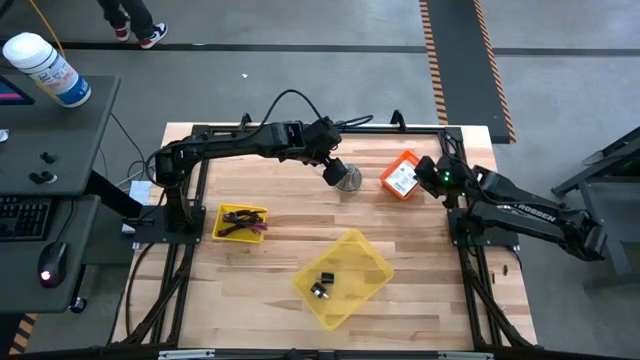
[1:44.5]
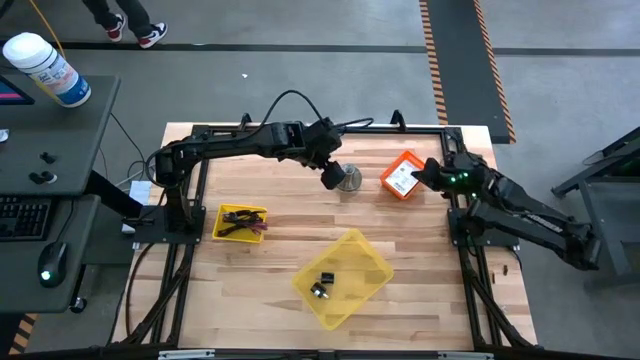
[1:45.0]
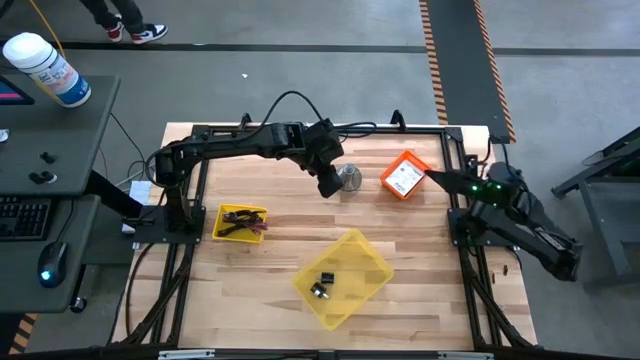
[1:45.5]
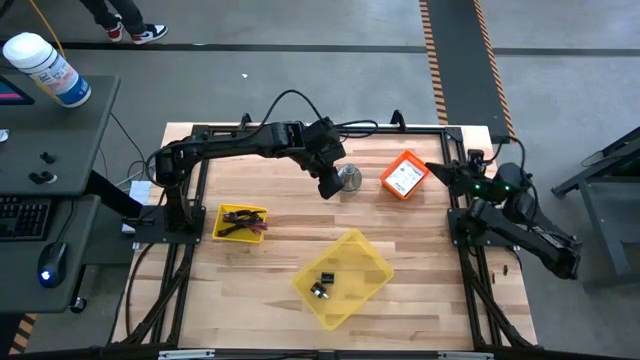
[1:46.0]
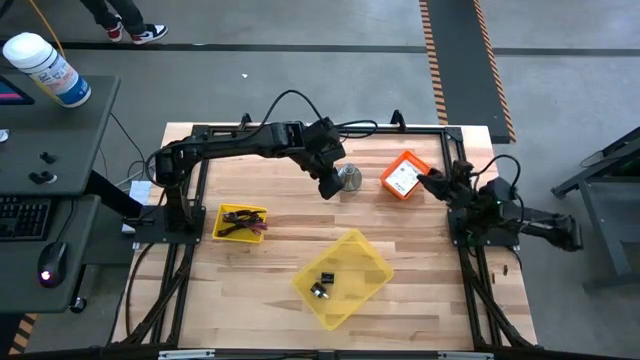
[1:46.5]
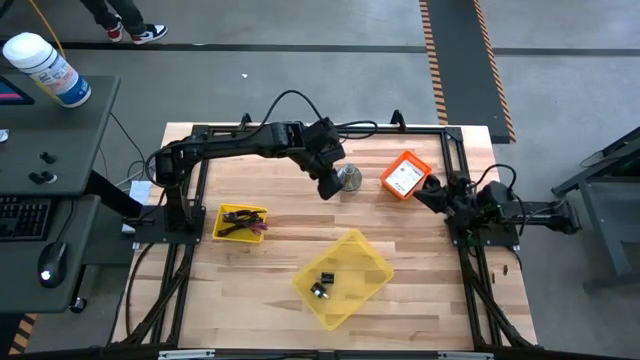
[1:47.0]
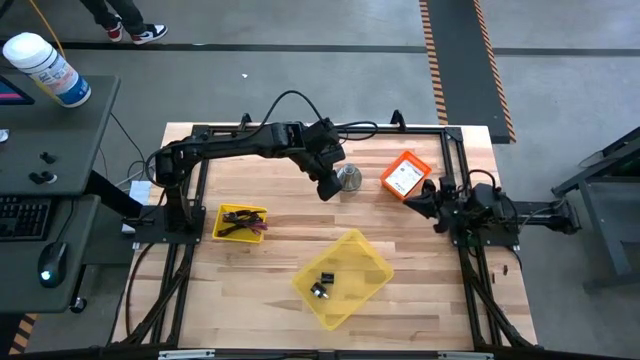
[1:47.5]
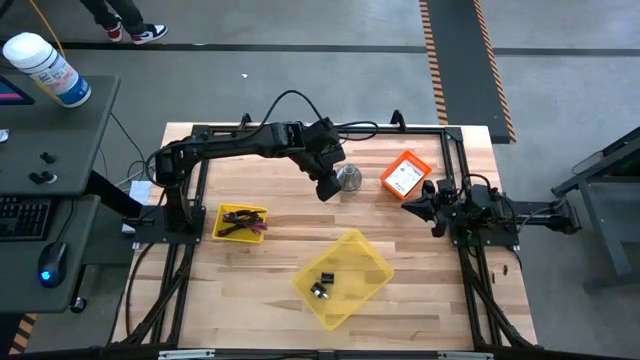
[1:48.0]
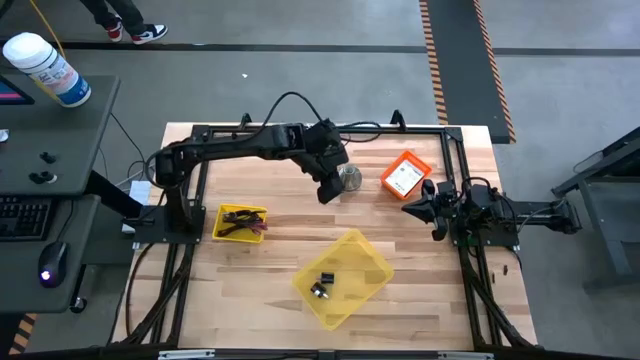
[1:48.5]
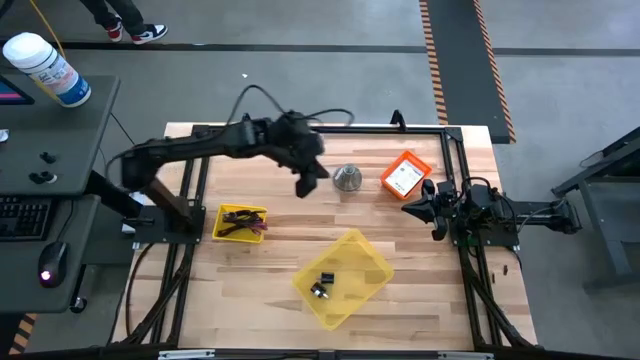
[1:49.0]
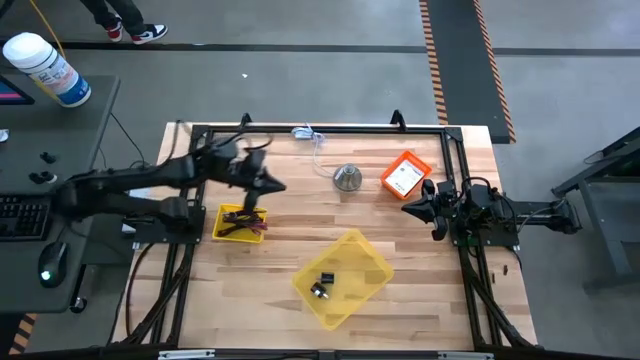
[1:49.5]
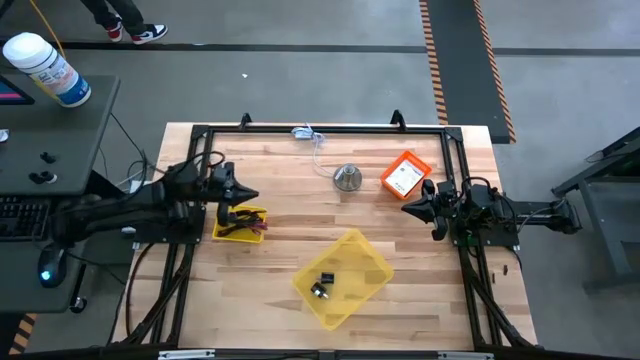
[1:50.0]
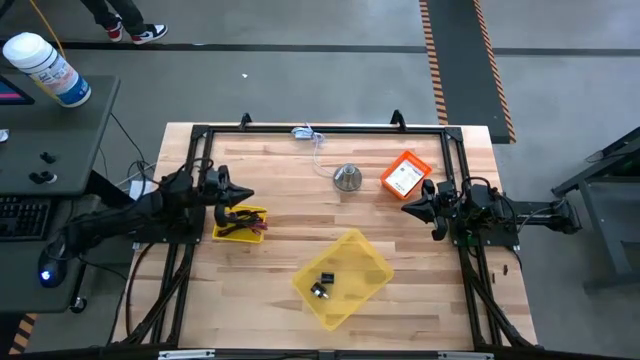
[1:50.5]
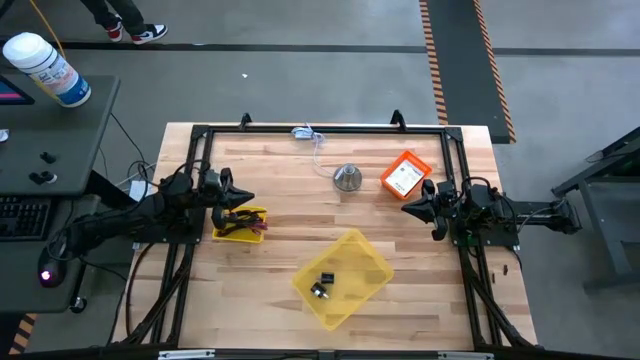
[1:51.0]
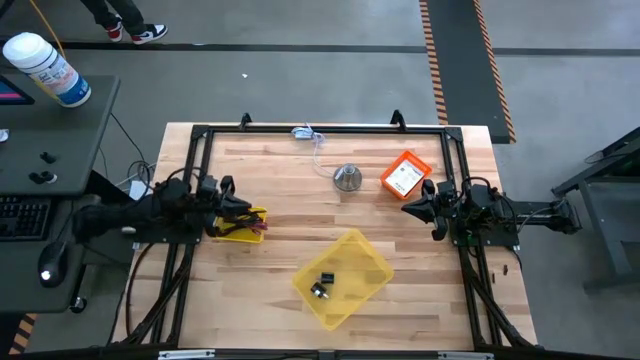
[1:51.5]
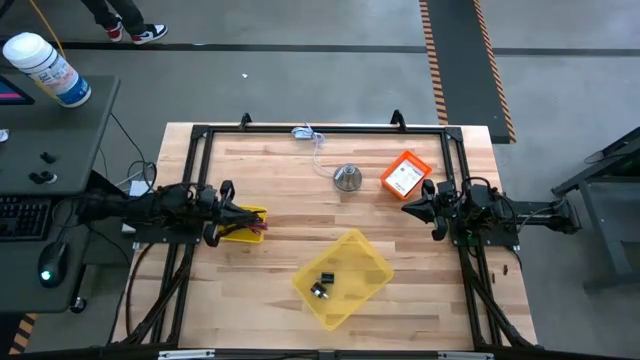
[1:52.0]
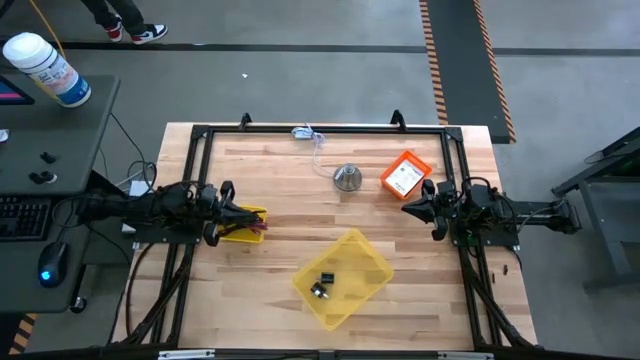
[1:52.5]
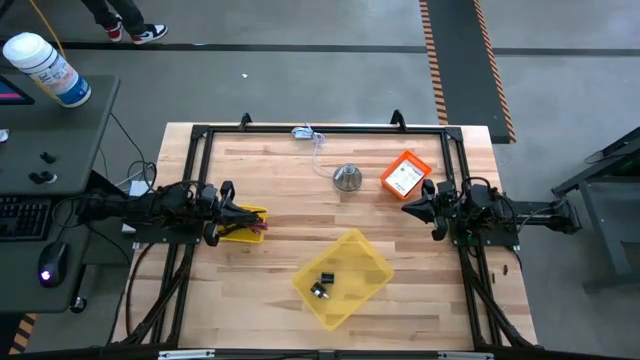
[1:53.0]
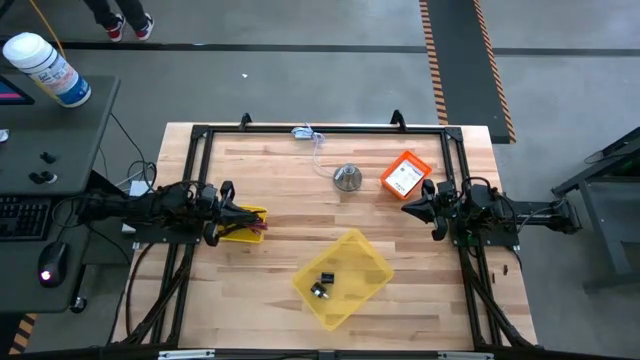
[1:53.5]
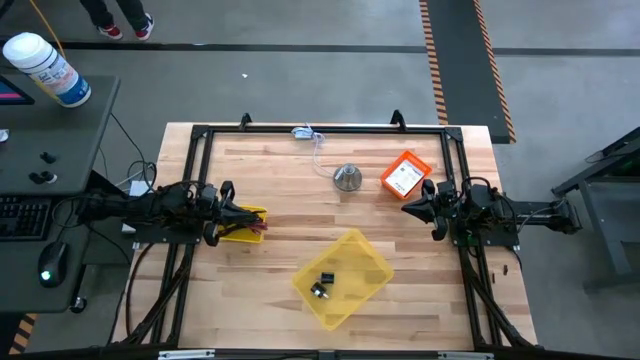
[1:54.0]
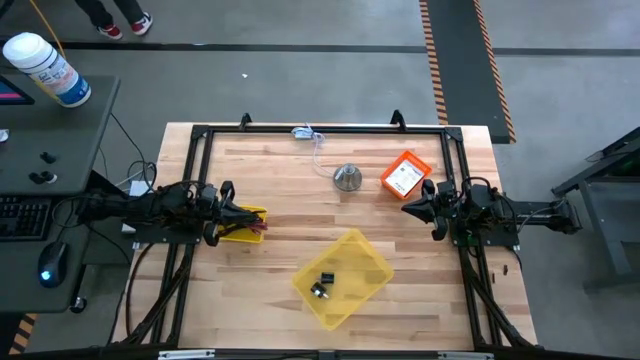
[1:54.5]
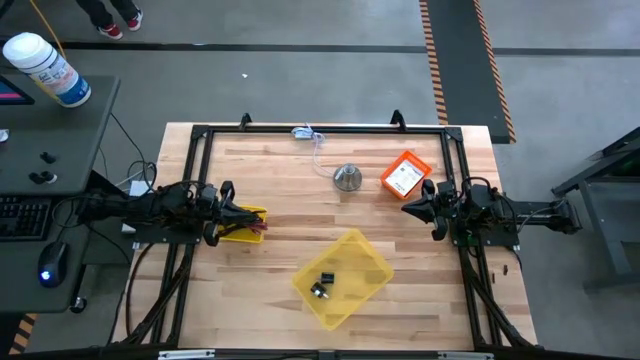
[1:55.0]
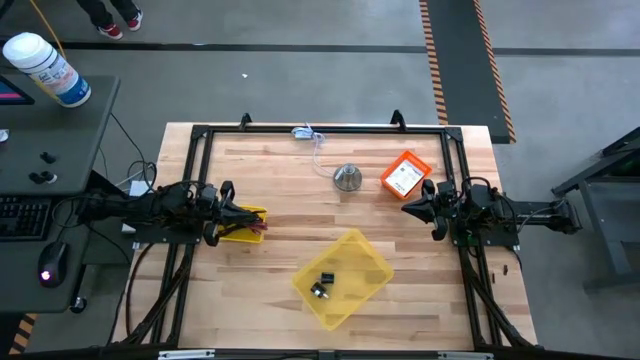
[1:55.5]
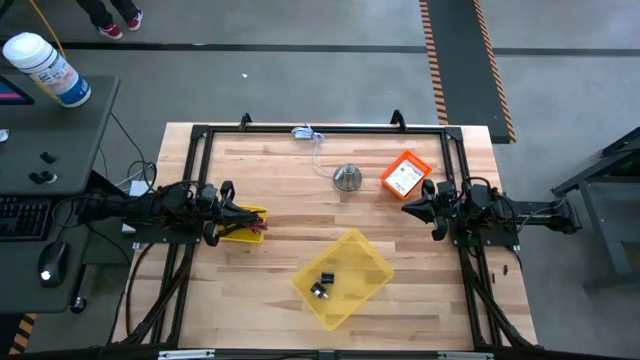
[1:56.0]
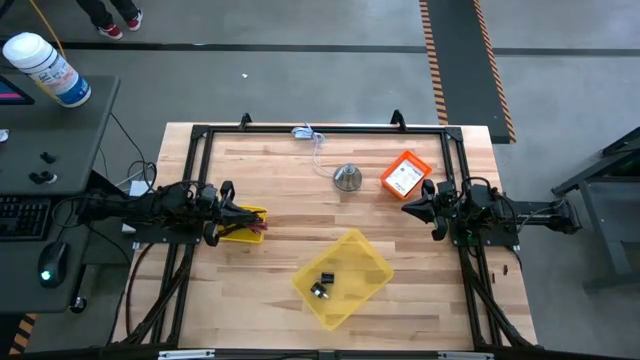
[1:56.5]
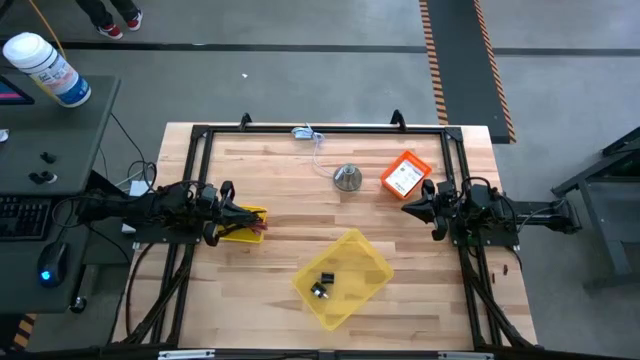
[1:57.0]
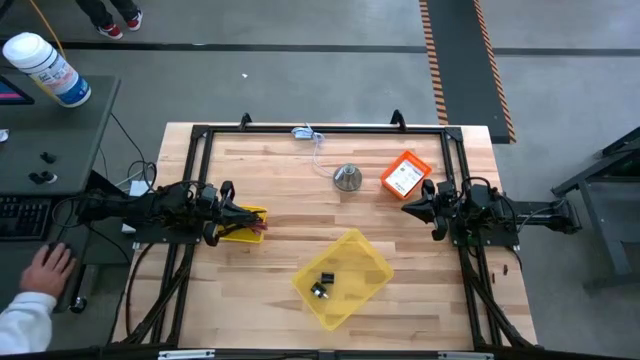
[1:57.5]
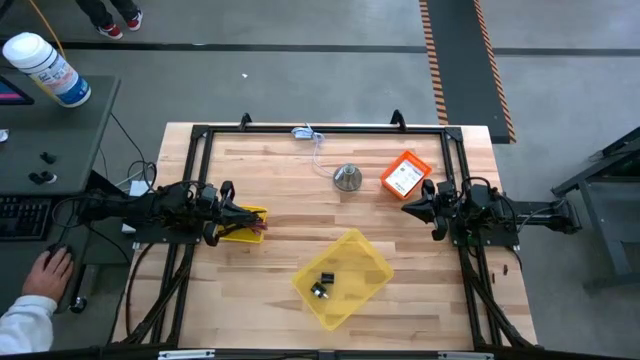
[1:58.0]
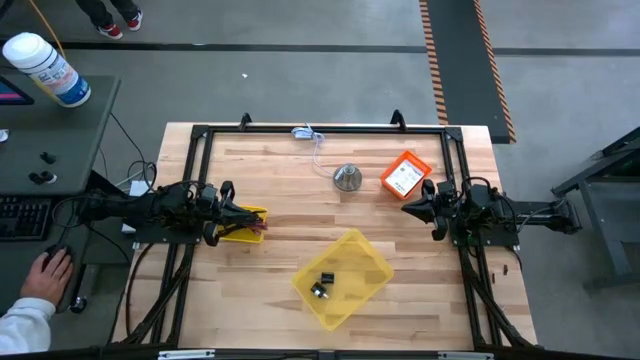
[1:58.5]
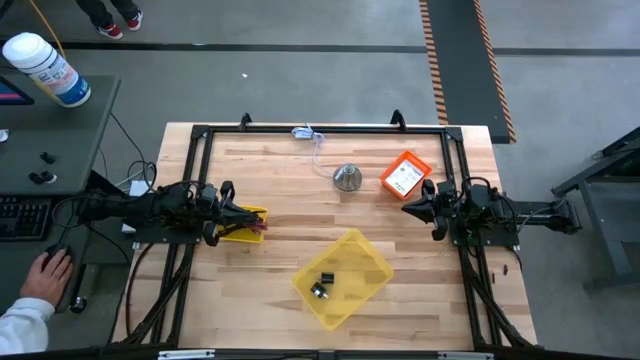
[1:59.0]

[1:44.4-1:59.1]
Task: Pick and place items into bin
Return to Home Position

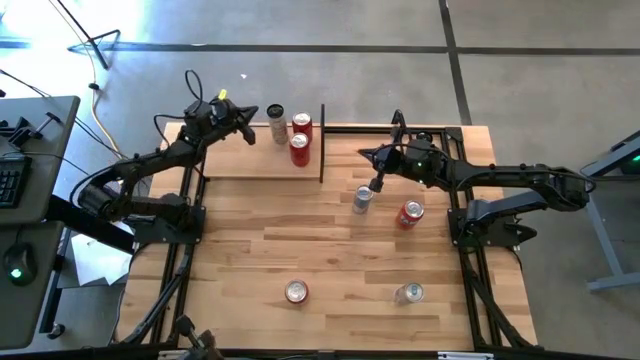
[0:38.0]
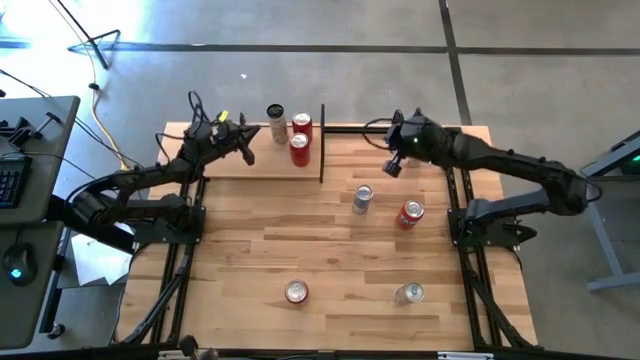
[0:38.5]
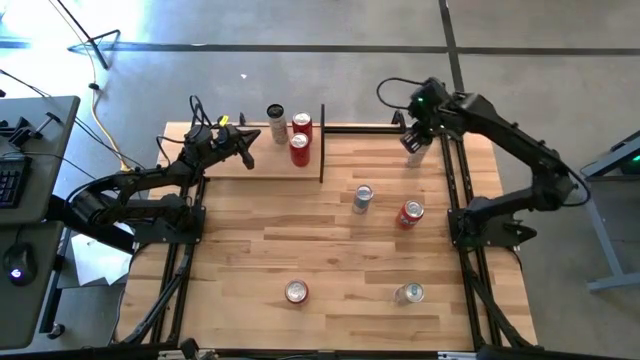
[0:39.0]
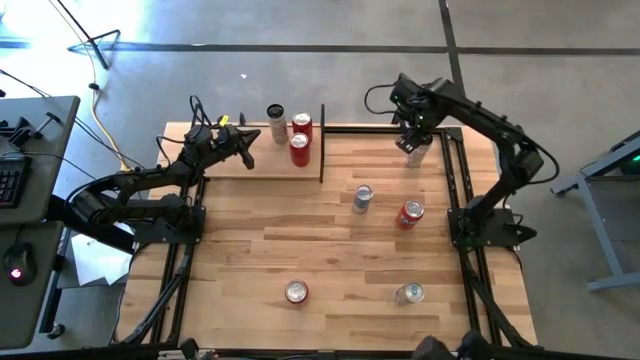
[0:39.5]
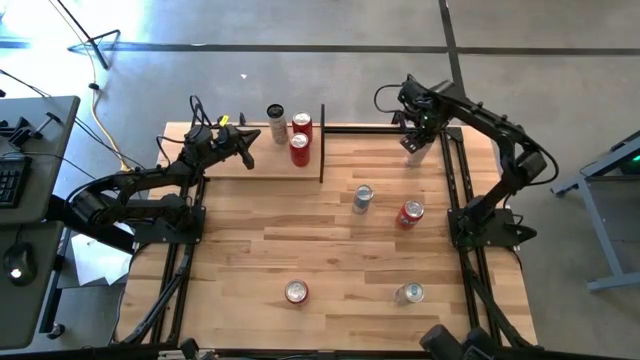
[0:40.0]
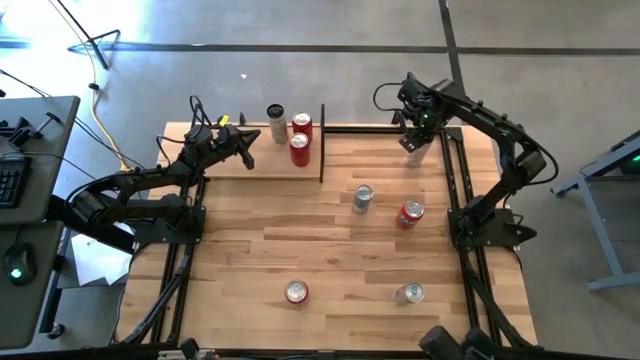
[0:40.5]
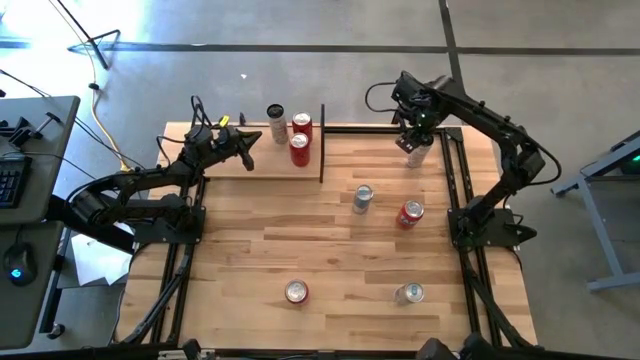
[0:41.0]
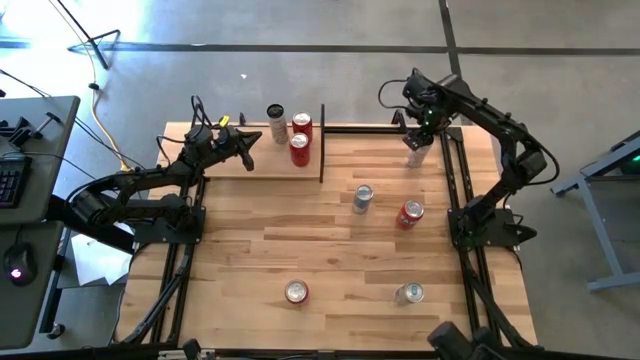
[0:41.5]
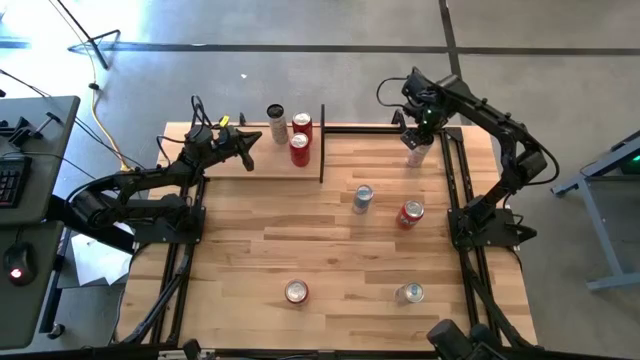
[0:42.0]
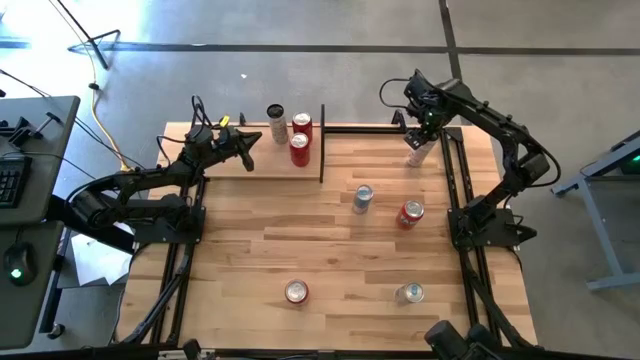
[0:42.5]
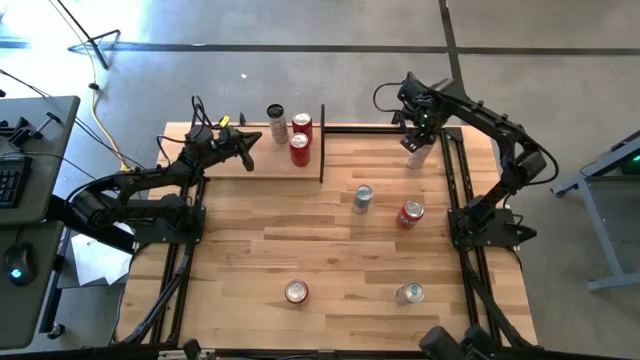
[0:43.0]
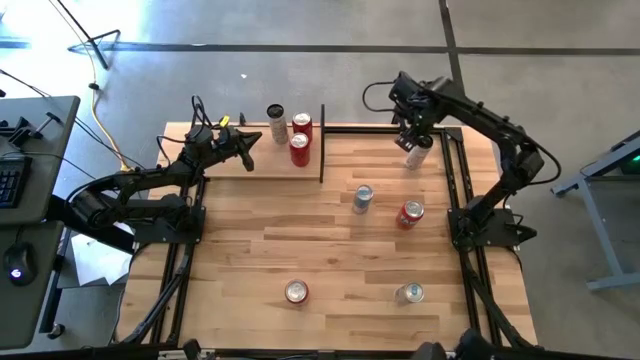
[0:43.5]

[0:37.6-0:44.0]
Task: Place canned beverage on shelf
Put the white yellow soda can aligned with the other white yellow soda can on the shelf
